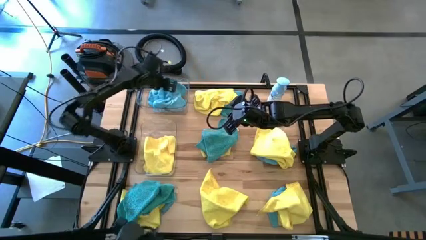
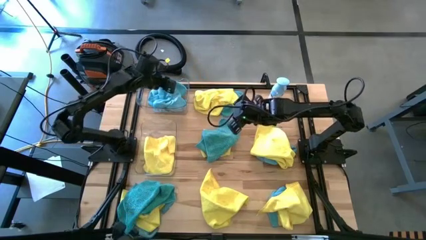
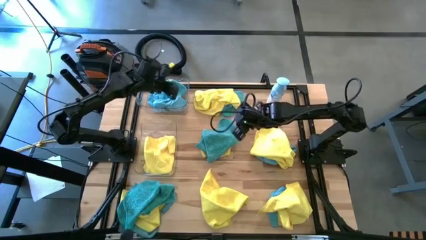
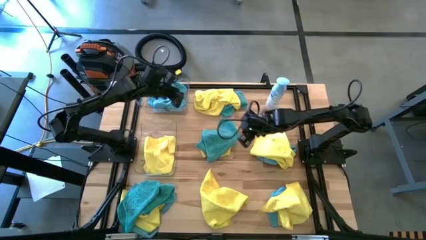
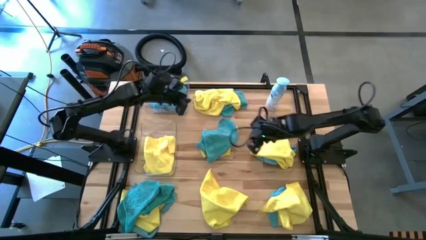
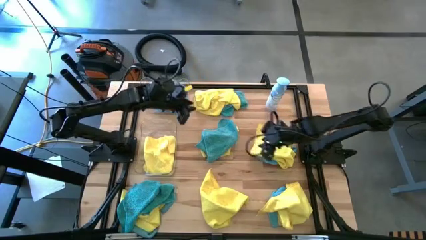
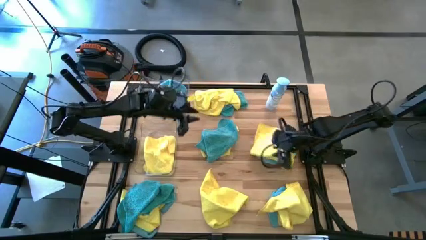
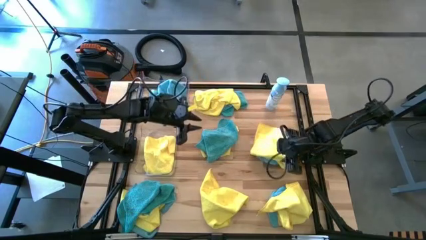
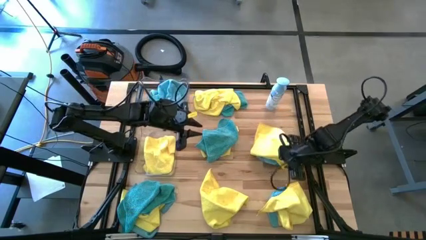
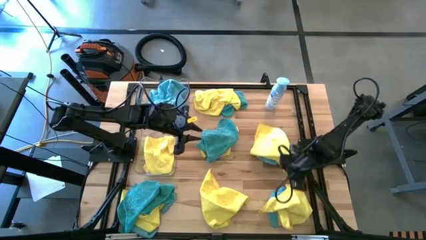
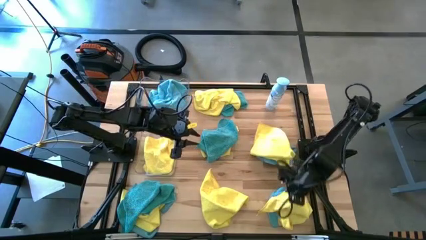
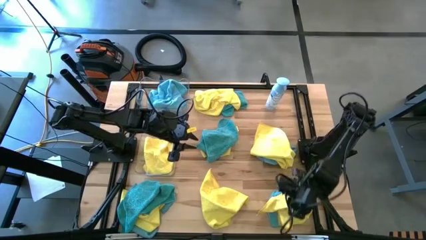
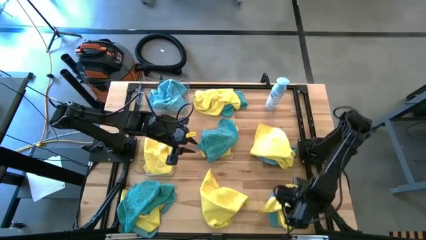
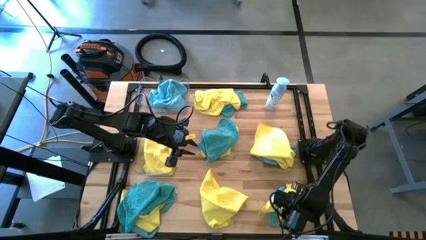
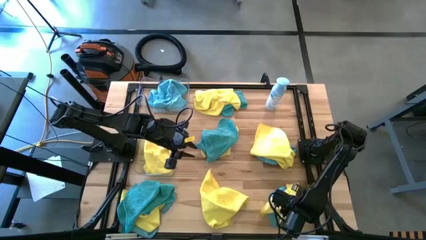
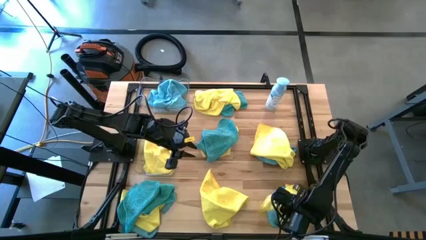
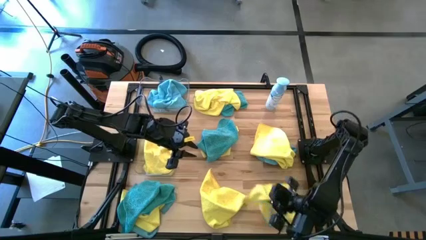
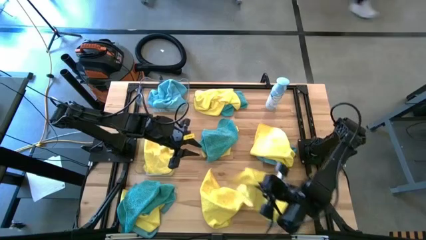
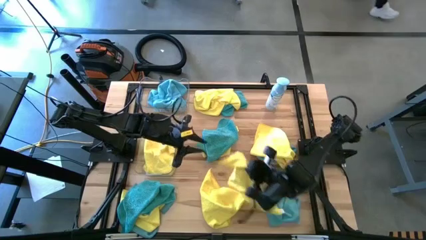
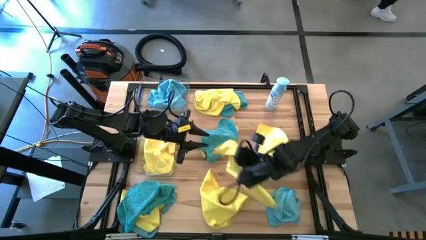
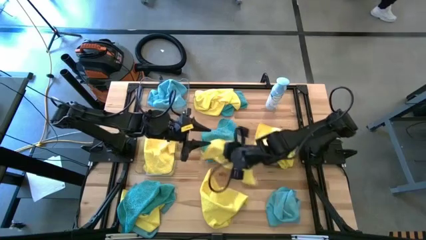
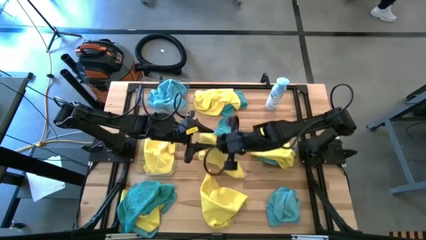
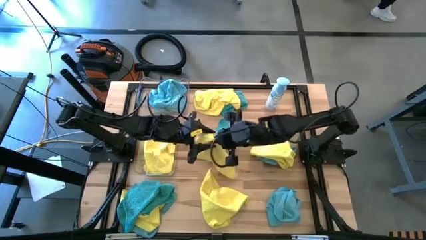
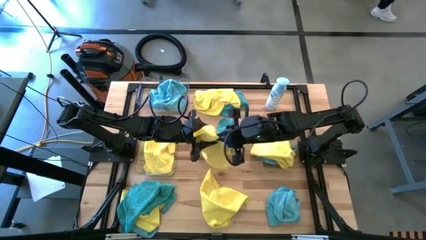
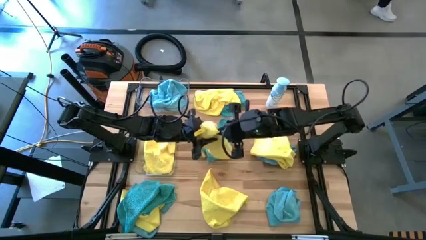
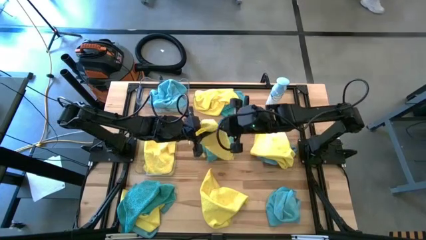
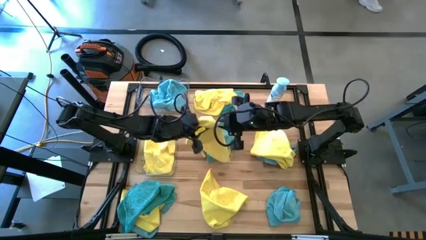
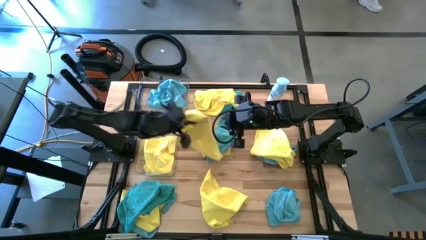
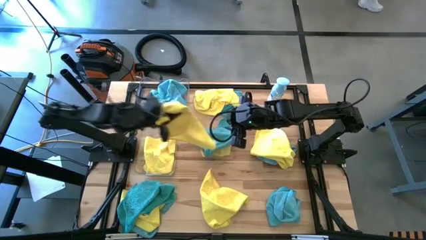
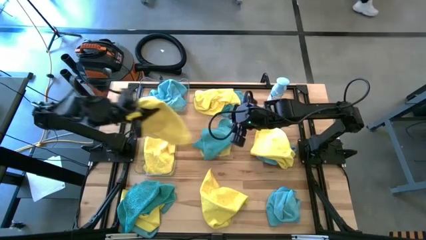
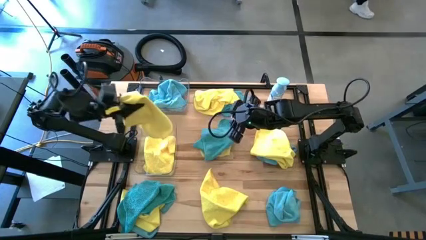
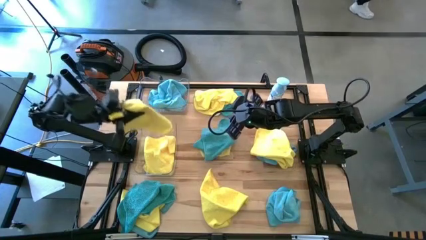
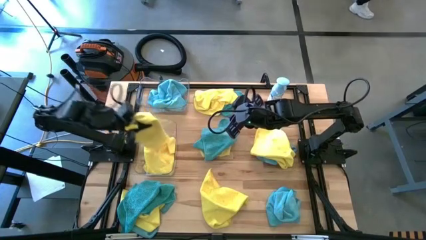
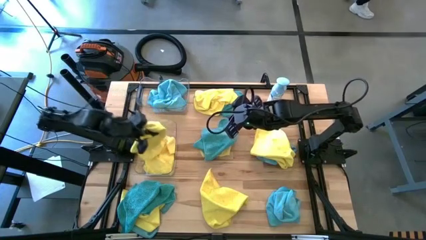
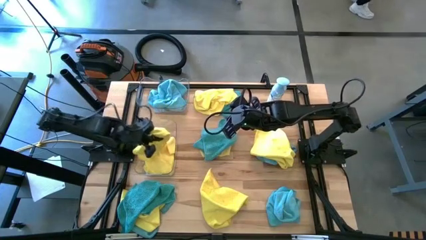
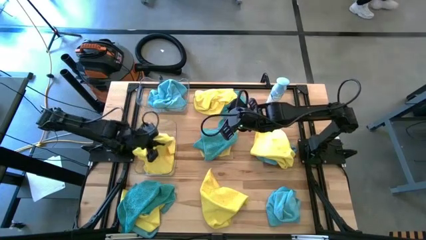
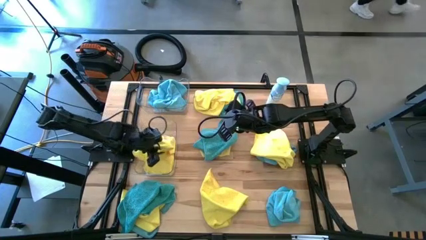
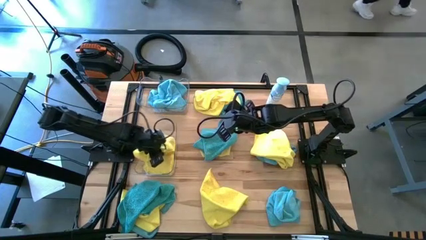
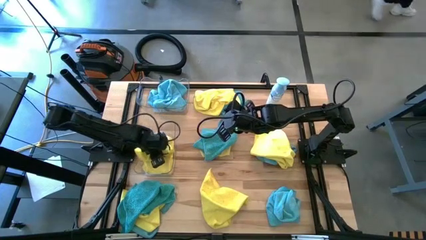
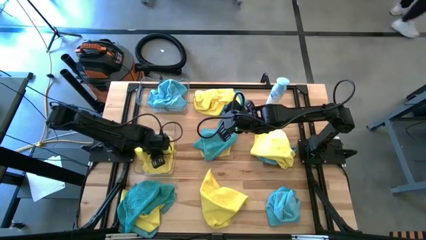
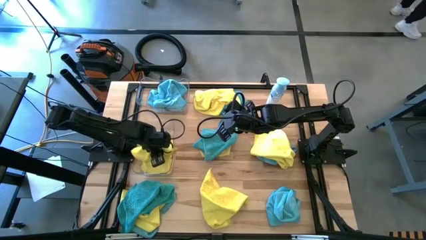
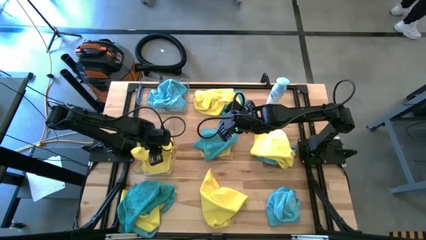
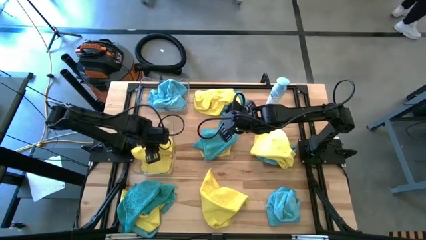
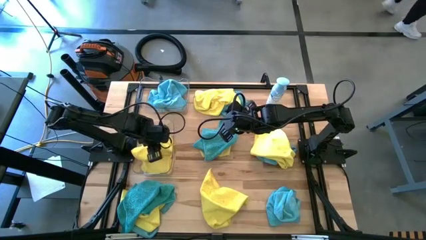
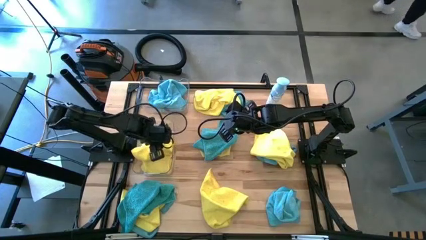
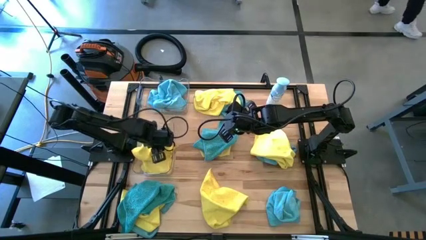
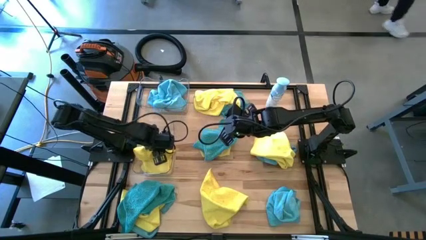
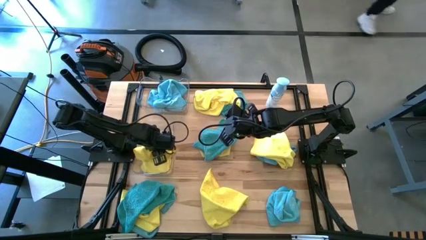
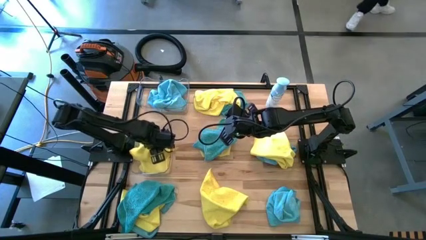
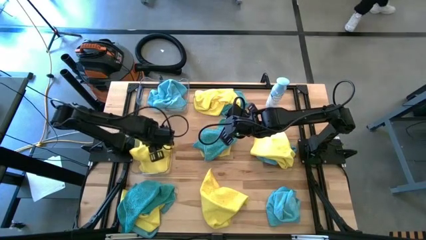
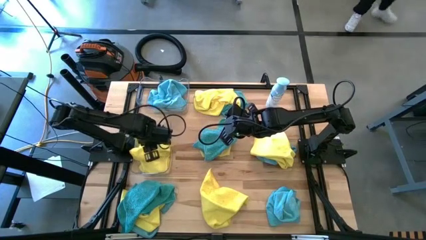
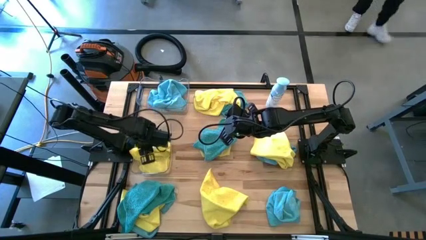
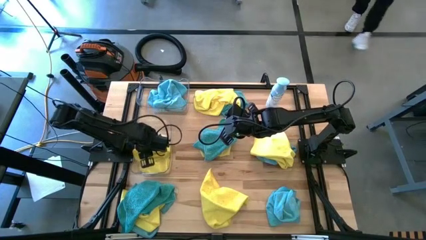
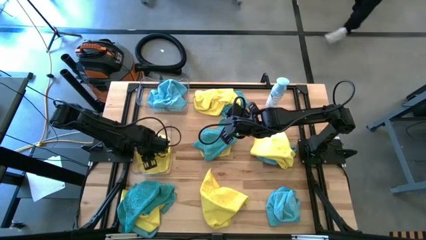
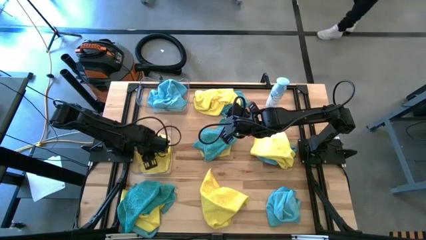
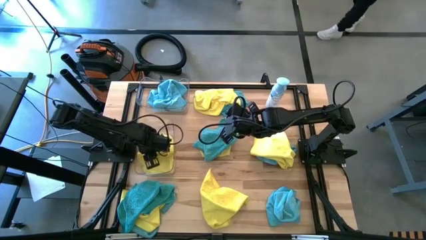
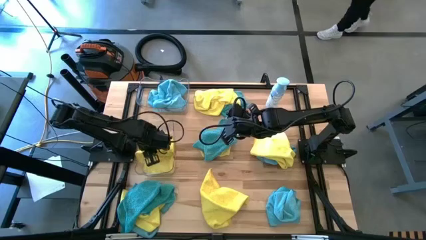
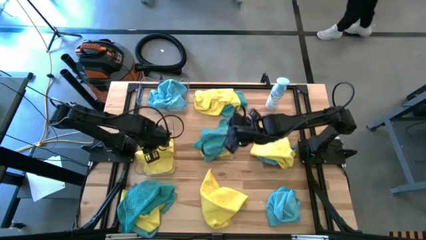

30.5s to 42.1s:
Task: Sort microfiber towel by color & place in baskets
Put the yellow towel into the bottom transparent bin

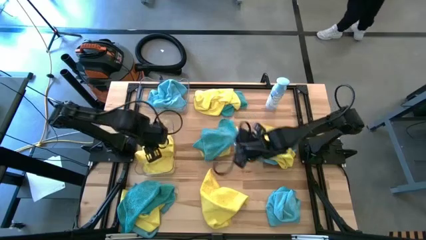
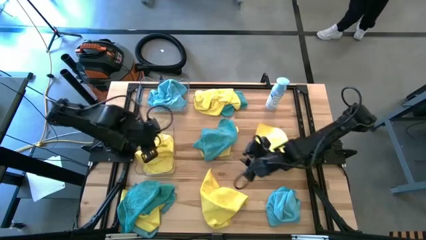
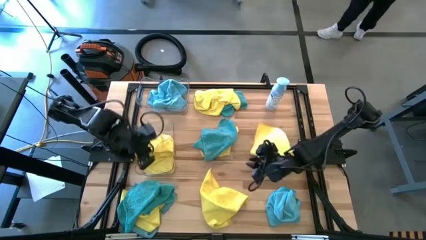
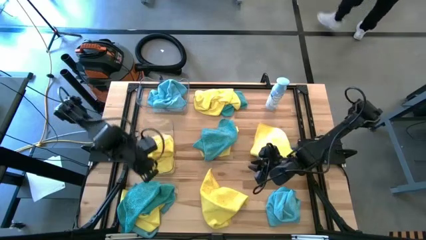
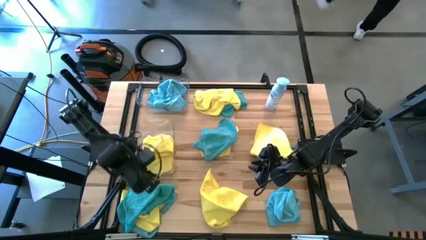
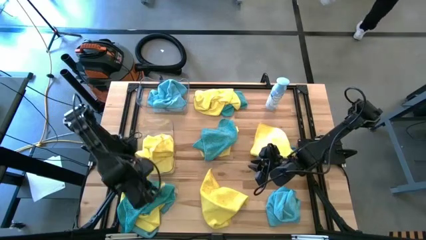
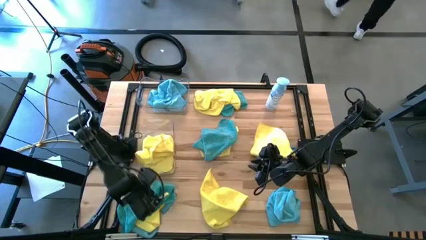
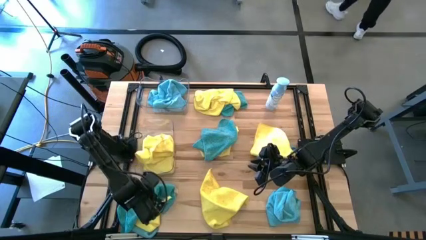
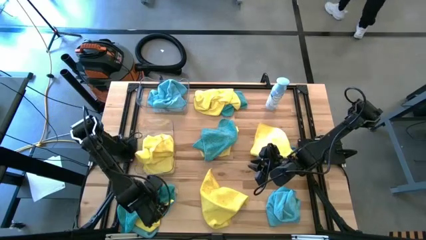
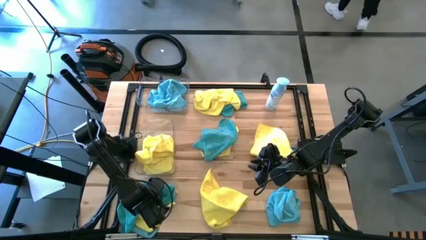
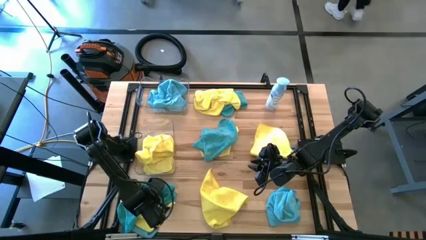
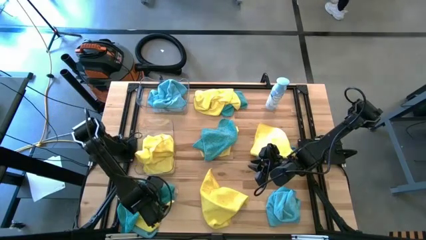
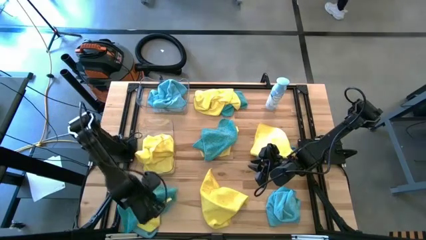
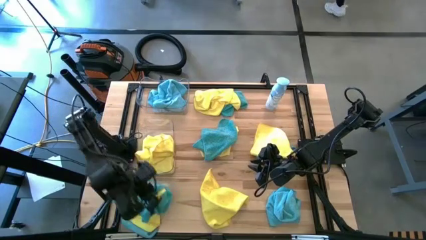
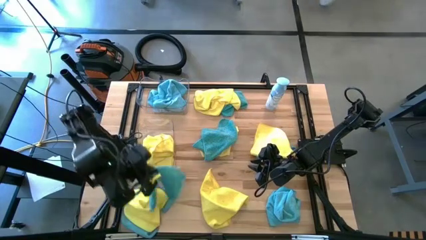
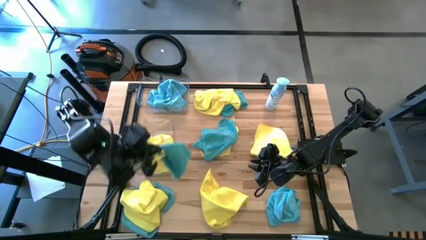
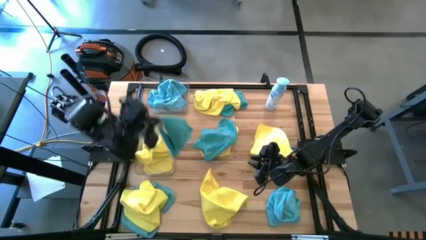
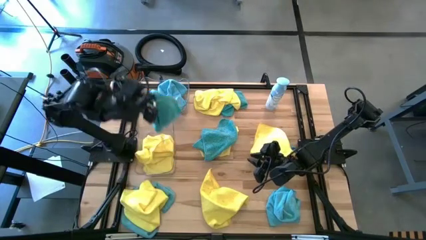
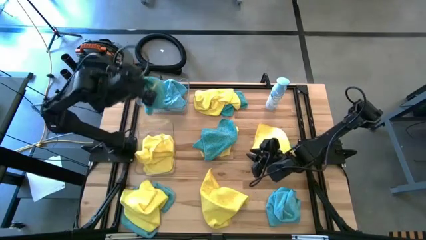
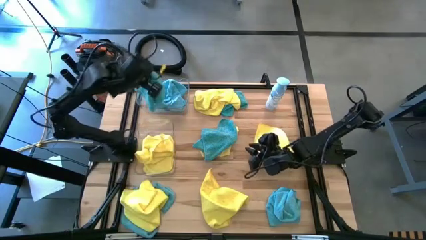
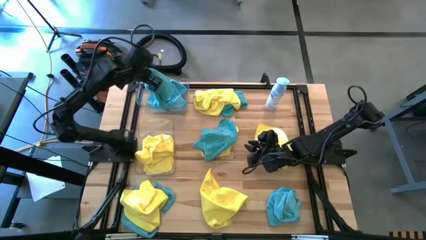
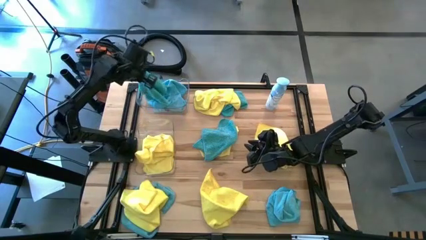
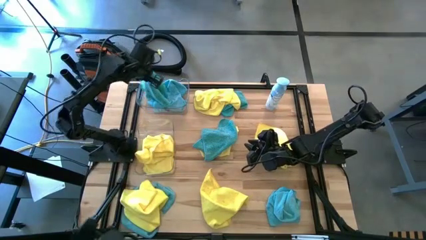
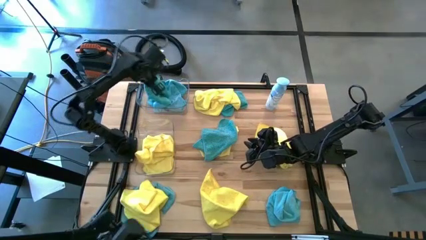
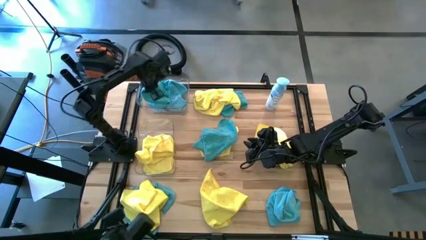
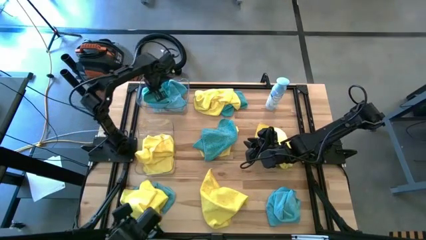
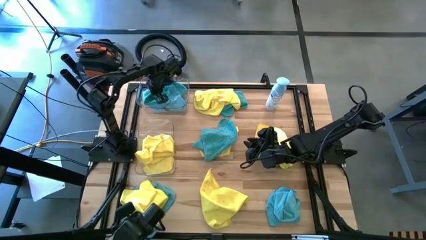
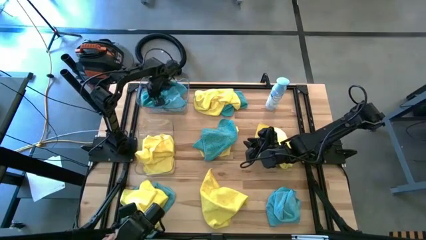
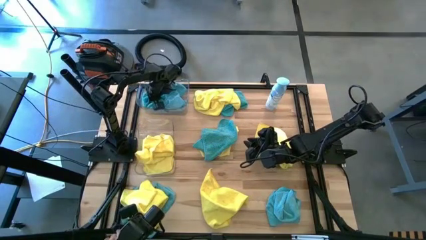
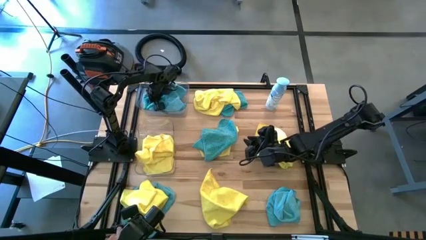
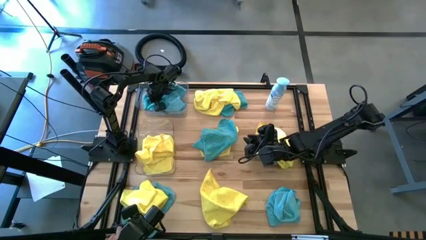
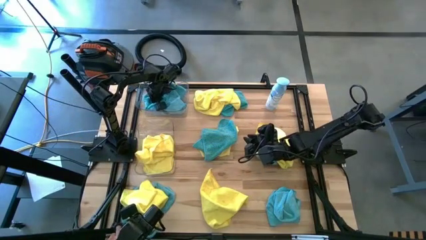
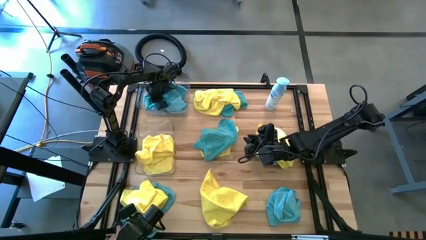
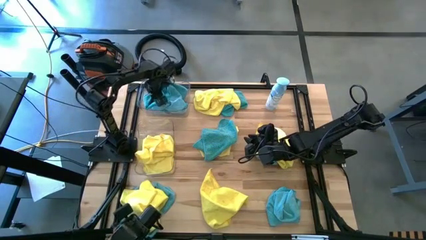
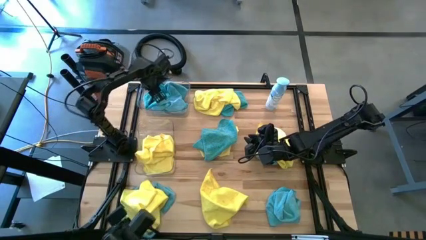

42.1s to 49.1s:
Put the blue towel into the top transparent bin
